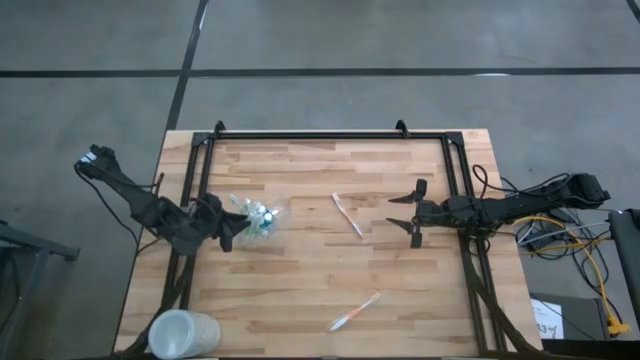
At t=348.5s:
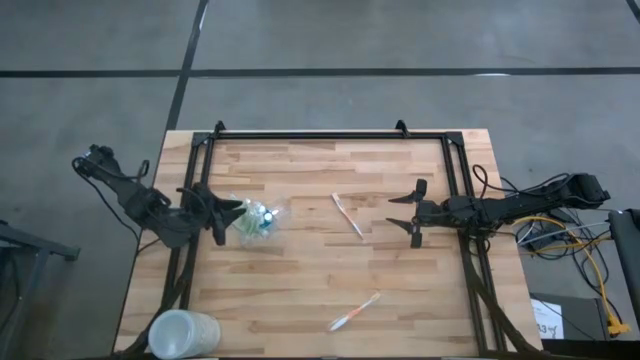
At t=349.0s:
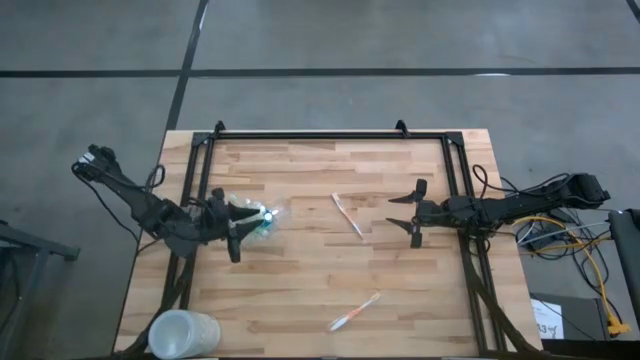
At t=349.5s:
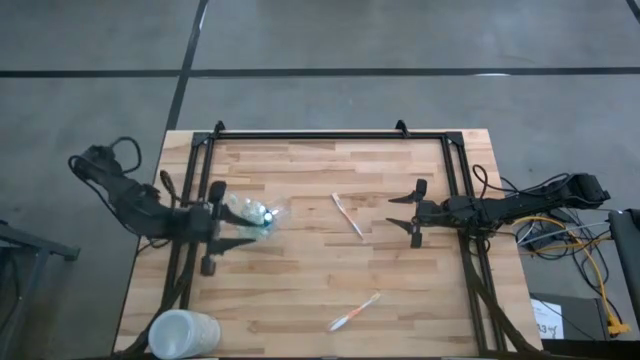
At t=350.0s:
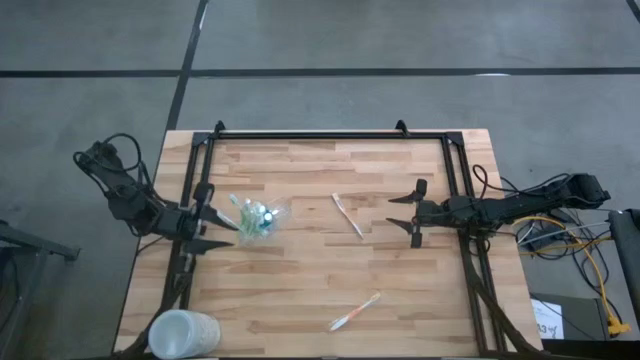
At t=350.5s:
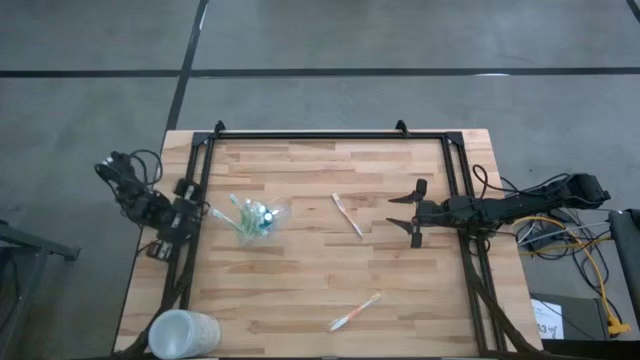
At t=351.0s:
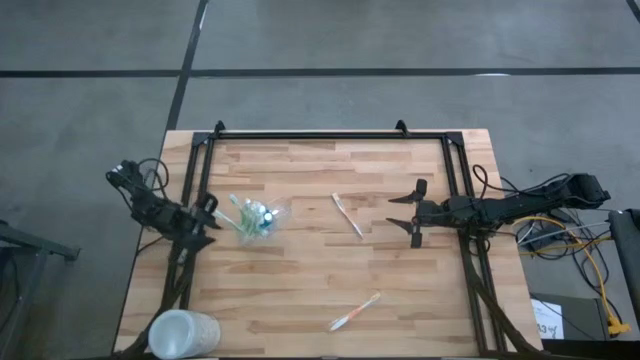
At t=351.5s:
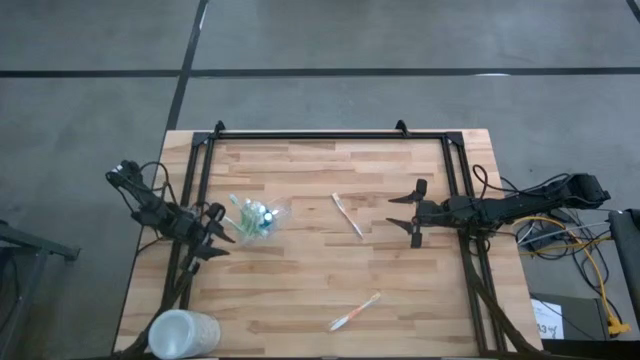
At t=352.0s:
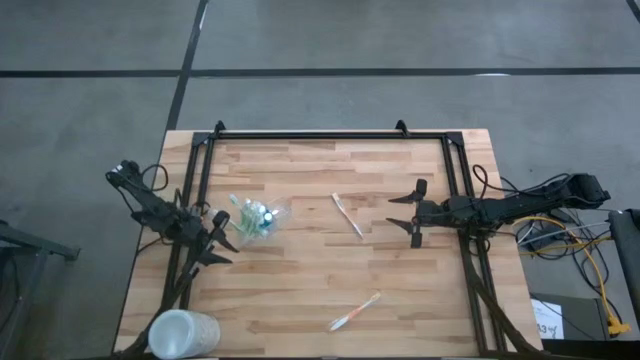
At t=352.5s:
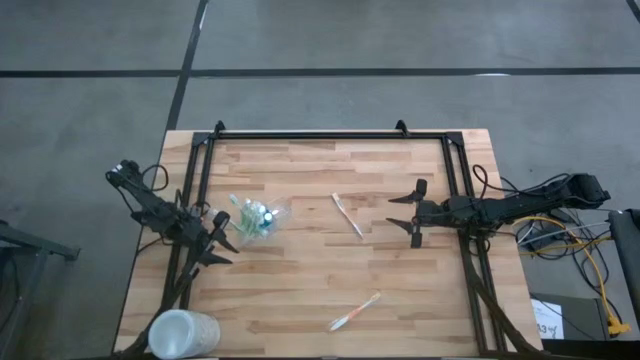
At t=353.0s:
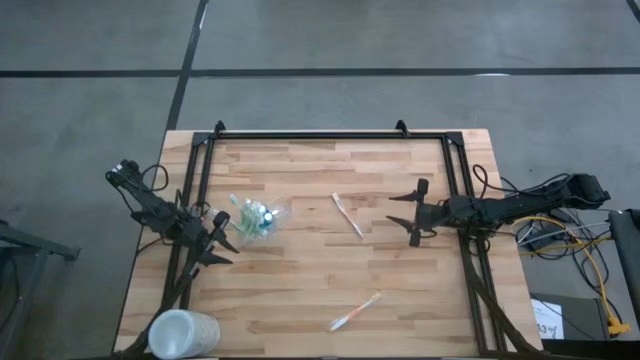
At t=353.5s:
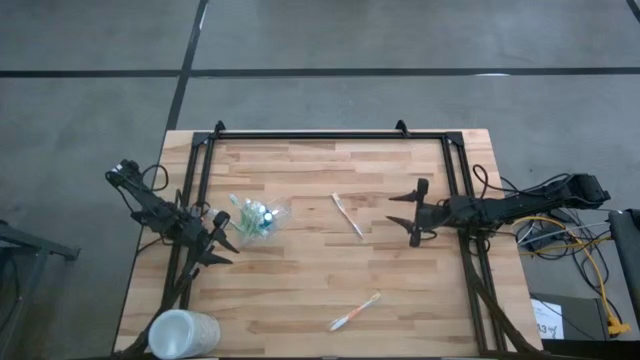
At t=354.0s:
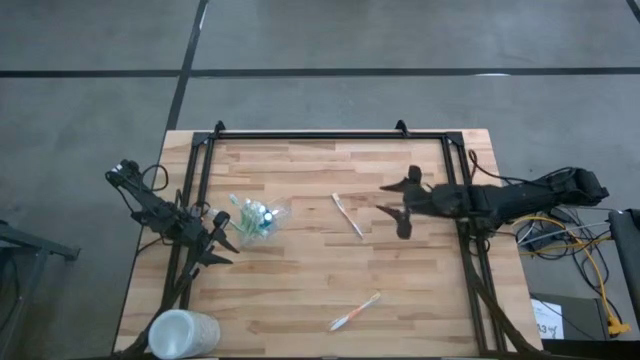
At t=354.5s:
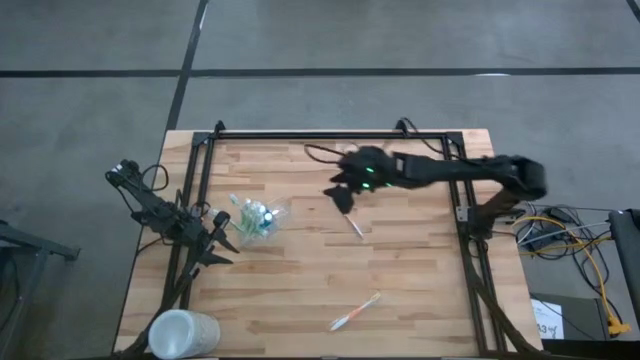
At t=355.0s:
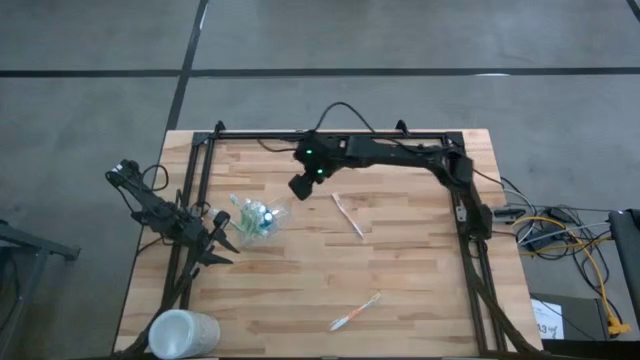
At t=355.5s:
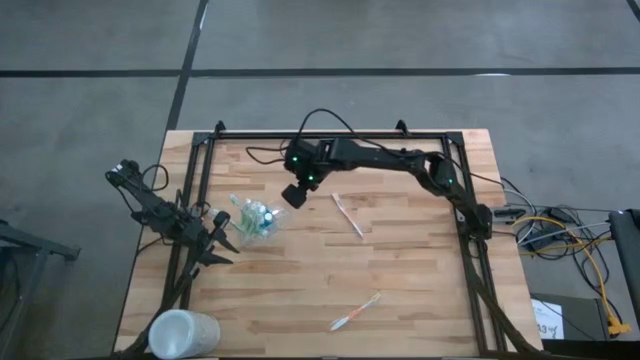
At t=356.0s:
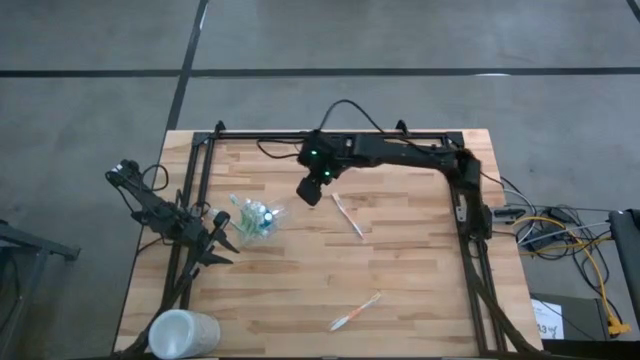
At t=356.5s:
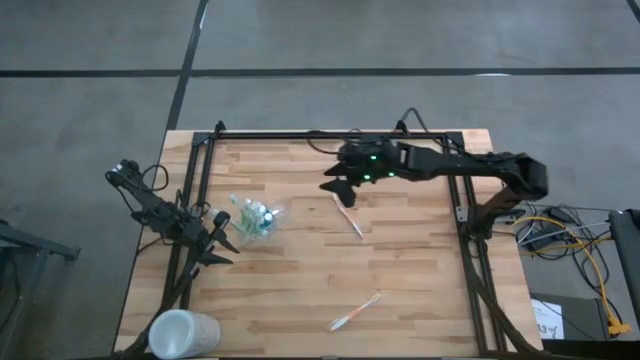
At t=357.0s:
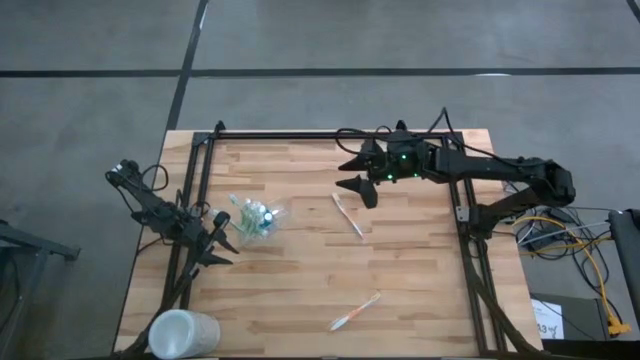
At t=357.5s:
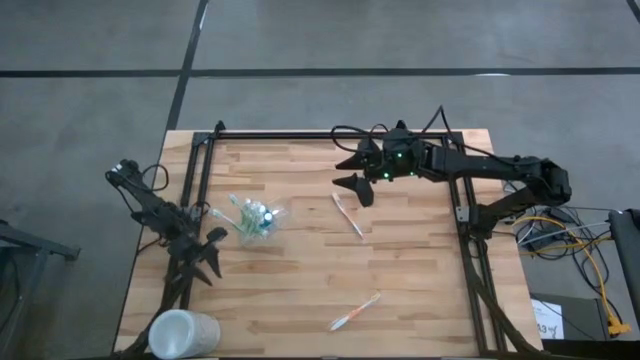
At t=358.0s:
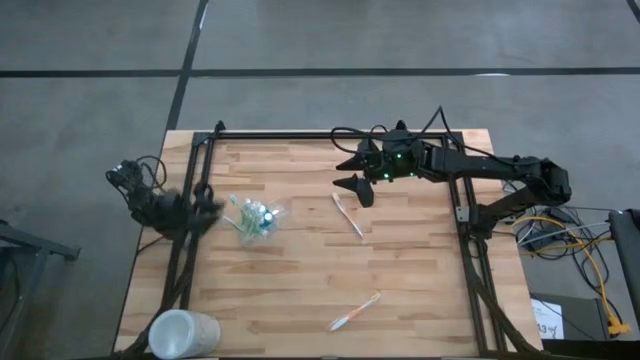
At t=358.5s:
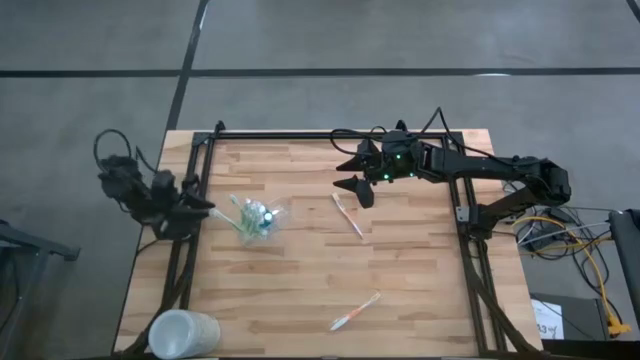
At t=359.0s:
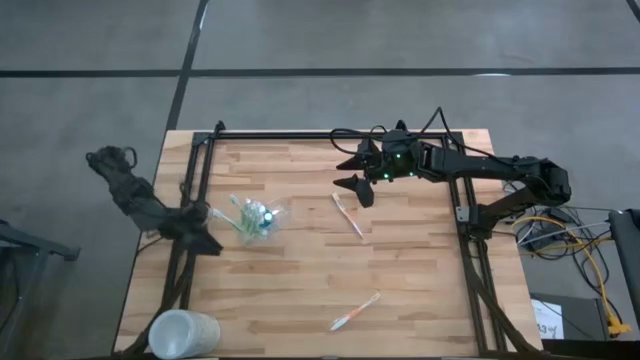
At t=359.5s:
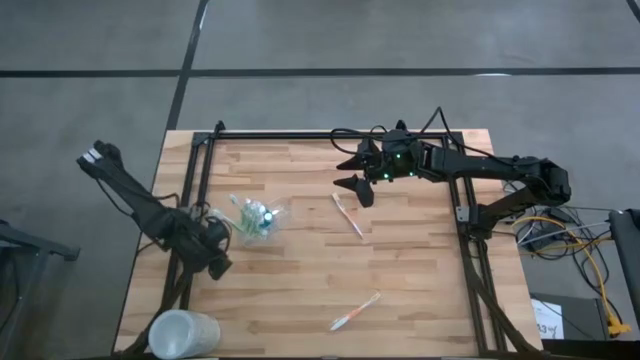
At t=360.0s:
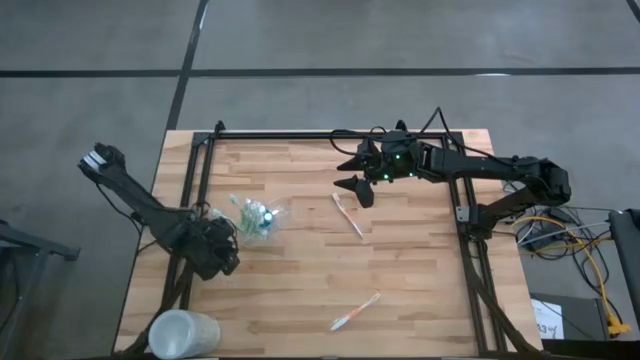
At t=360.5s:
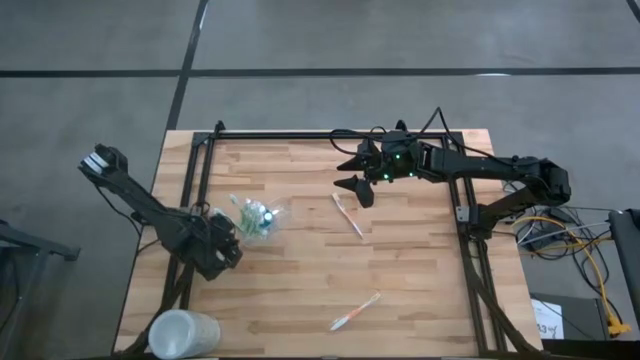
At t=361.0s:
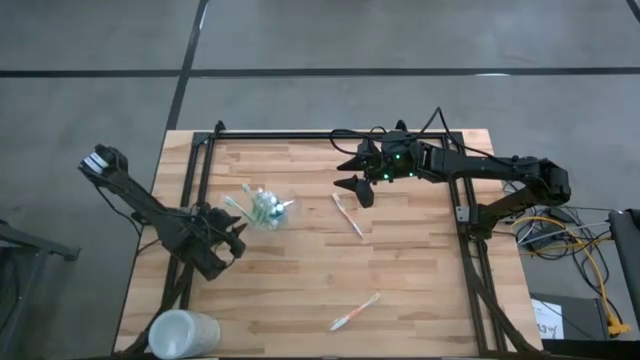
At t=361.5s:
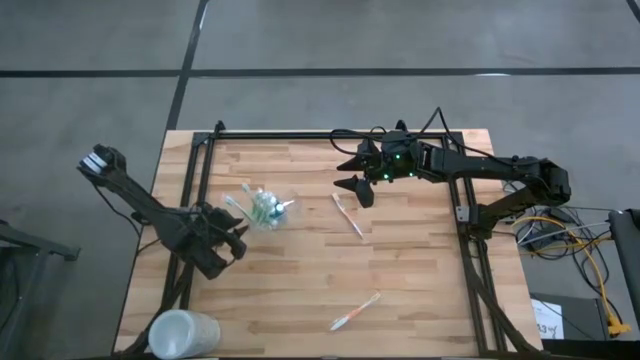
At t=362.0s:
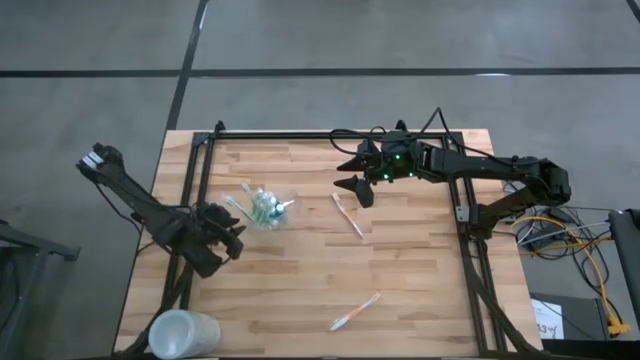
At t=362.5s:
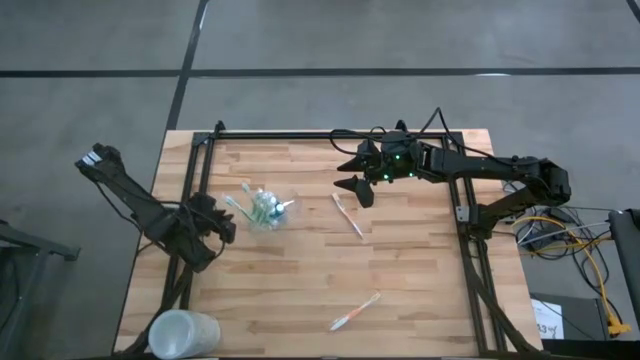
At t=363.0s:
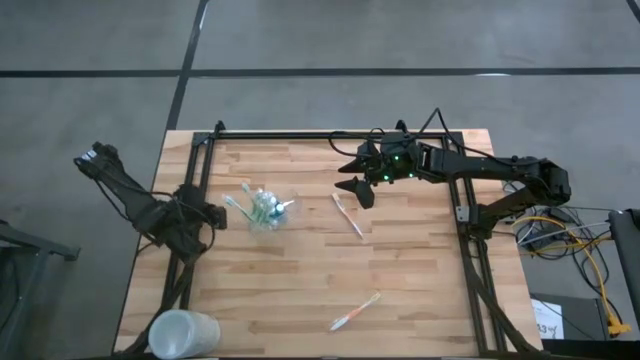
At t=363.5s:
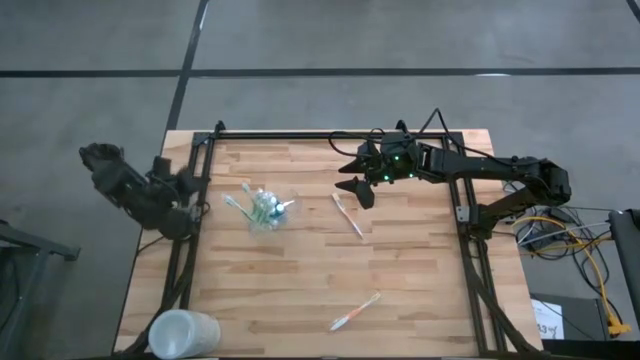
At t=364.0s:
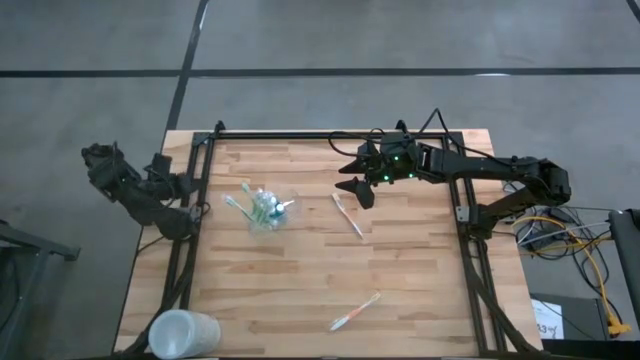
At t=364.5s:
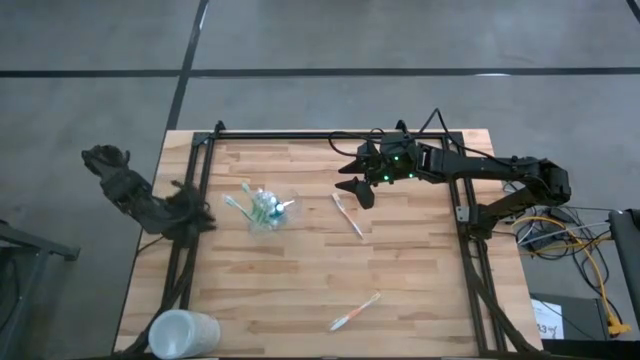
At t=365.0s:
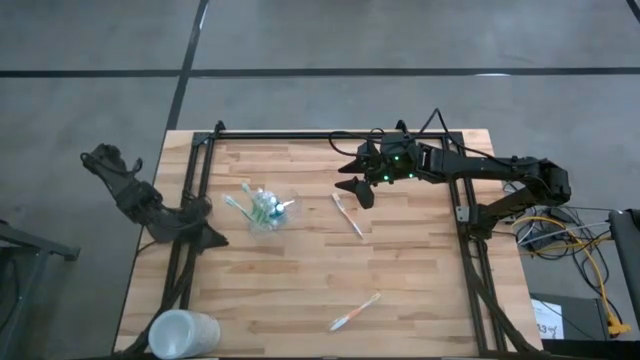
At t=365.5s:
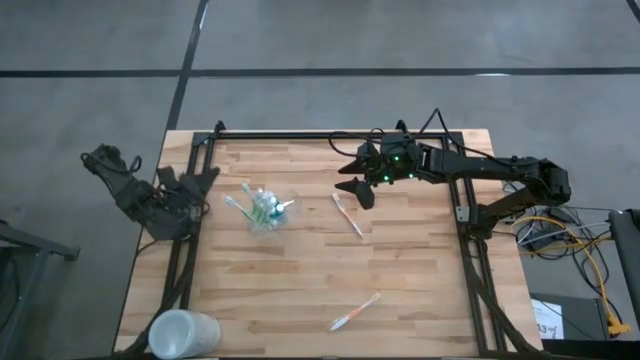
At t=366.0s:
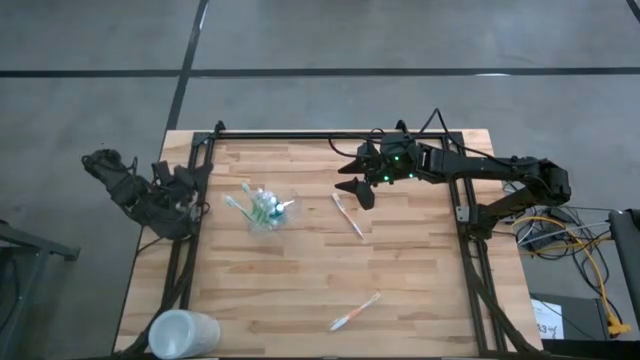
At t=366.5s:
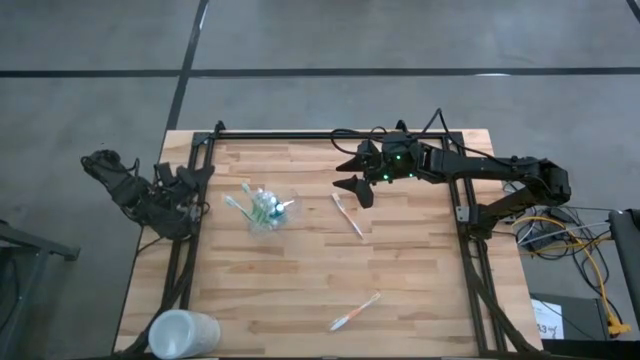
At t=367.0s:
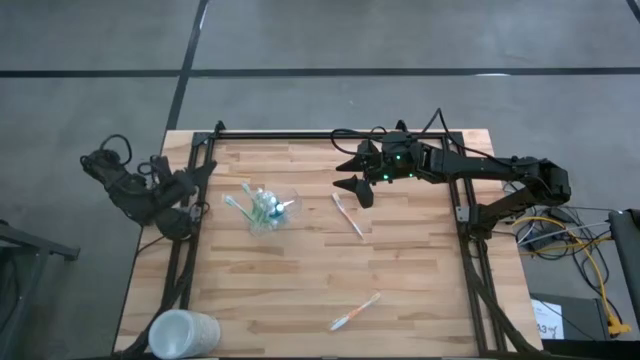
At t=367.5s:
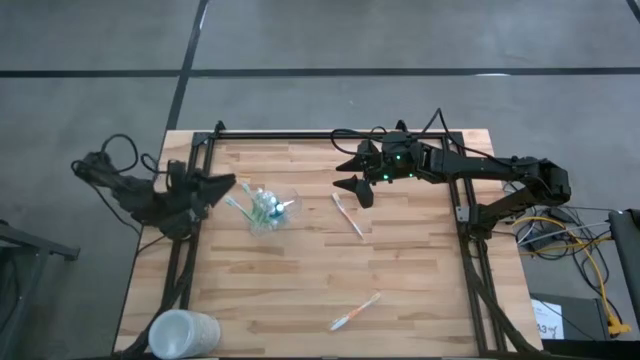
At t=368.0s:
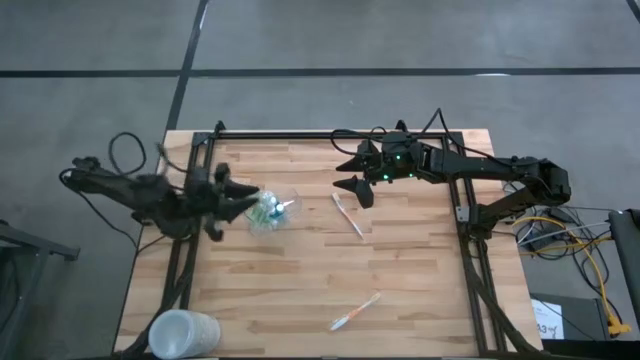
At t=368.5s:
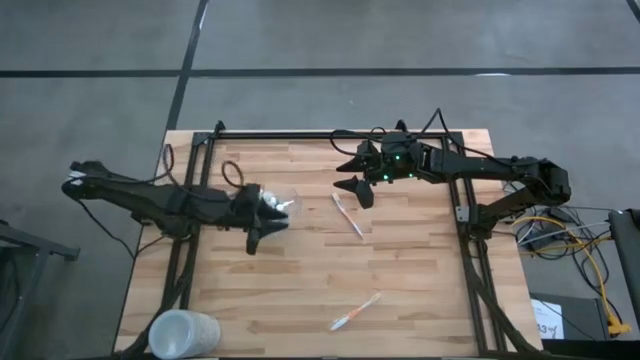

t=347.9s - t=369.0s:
Task: Pick & Place toothbrushing station
Move the transparent organizer to the center of the table
